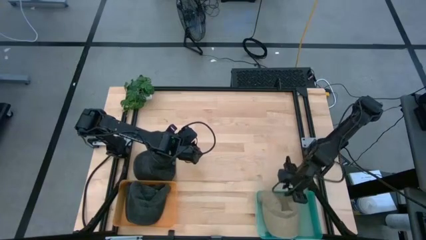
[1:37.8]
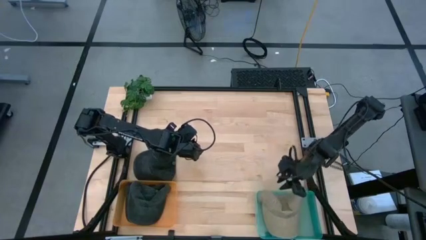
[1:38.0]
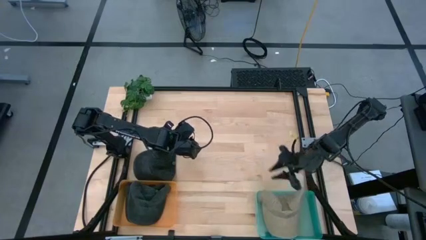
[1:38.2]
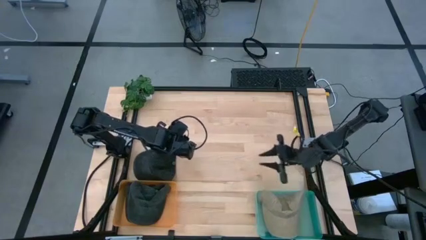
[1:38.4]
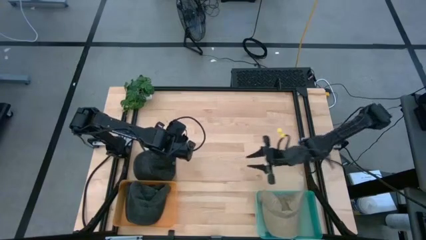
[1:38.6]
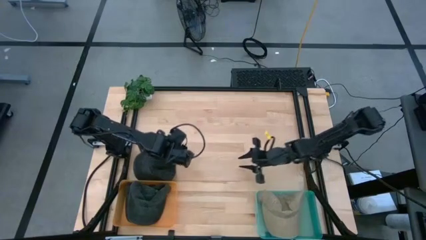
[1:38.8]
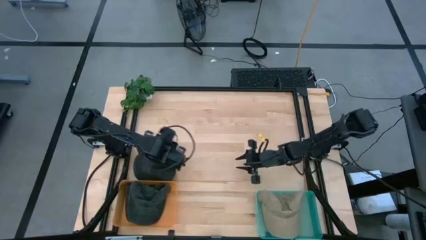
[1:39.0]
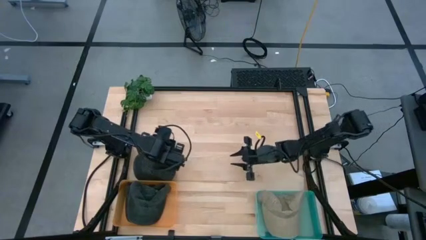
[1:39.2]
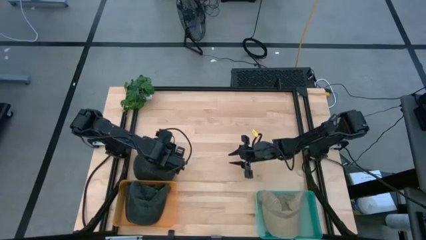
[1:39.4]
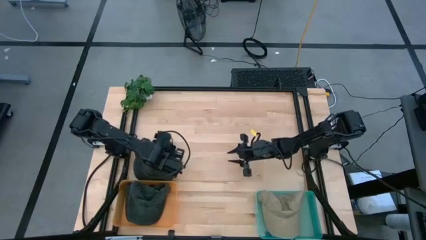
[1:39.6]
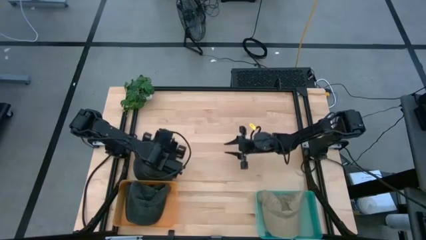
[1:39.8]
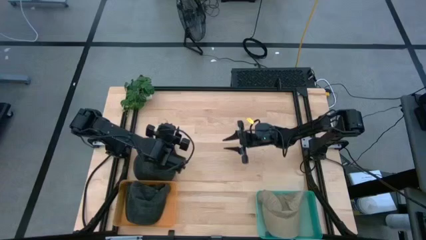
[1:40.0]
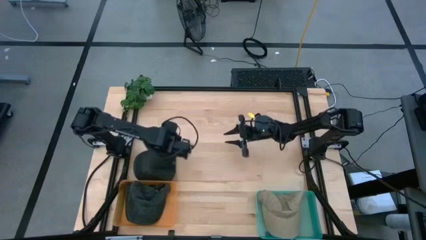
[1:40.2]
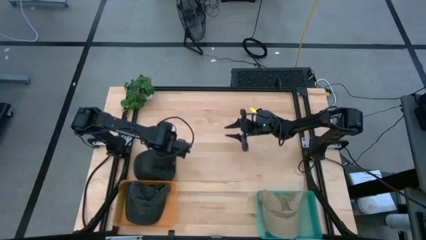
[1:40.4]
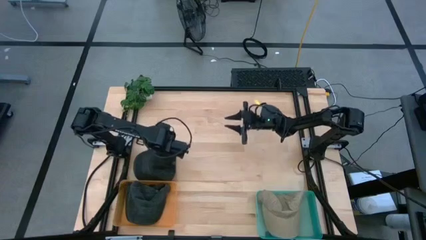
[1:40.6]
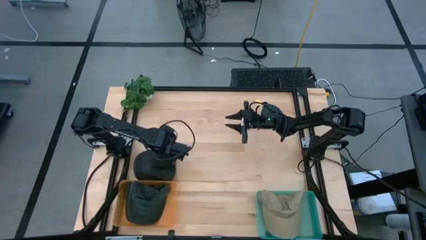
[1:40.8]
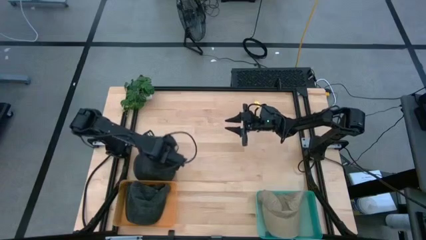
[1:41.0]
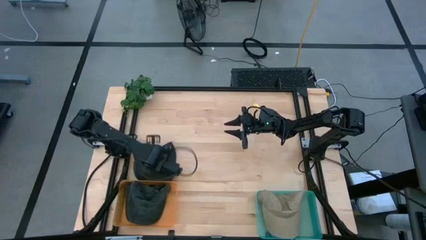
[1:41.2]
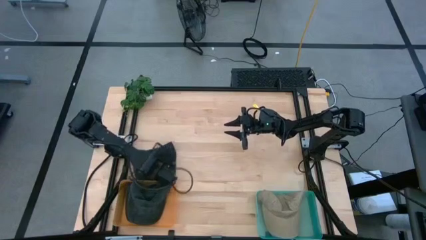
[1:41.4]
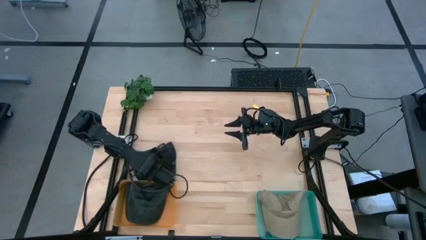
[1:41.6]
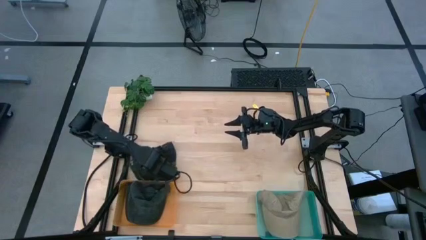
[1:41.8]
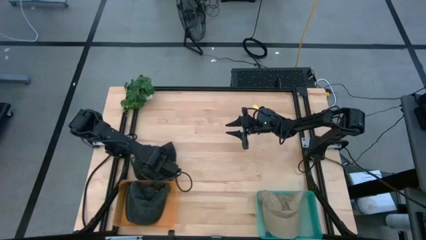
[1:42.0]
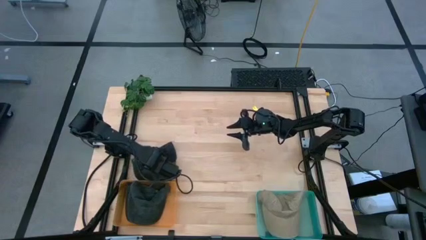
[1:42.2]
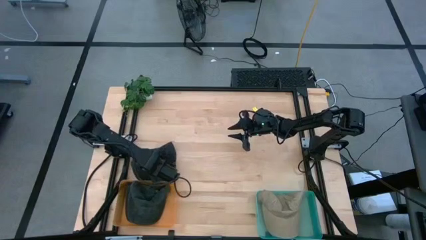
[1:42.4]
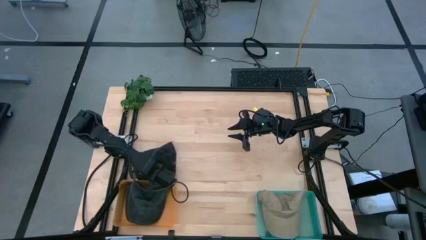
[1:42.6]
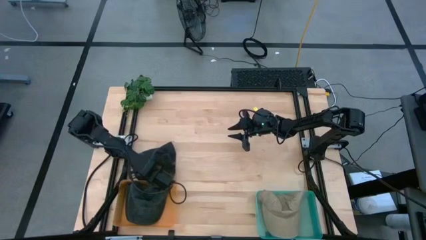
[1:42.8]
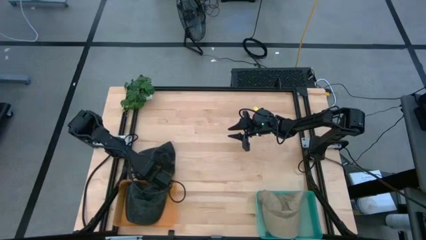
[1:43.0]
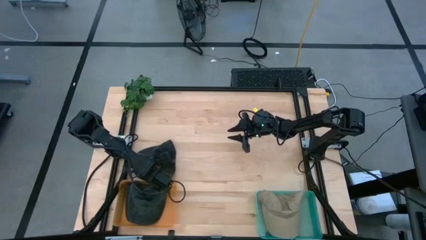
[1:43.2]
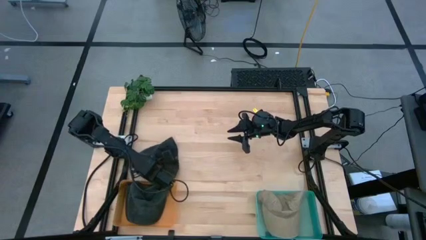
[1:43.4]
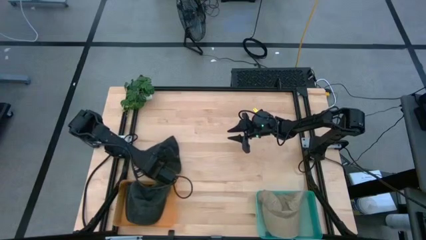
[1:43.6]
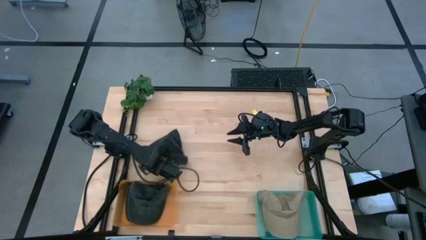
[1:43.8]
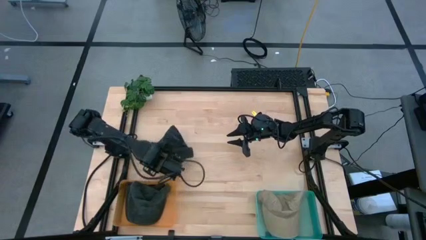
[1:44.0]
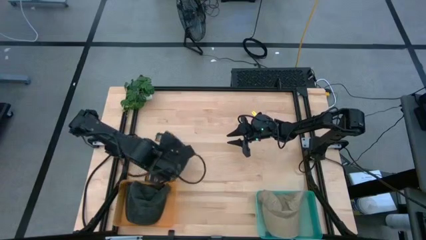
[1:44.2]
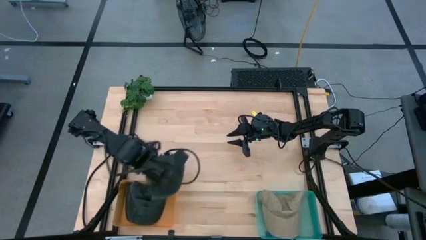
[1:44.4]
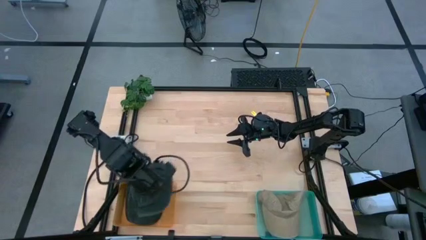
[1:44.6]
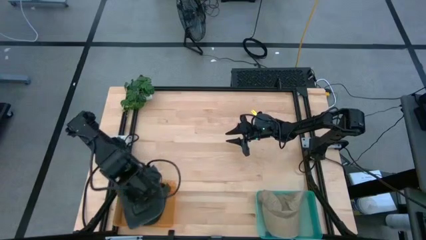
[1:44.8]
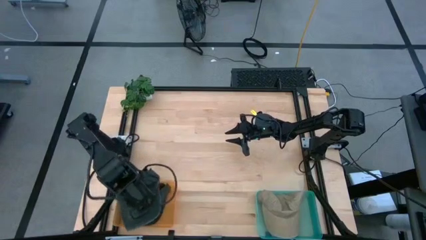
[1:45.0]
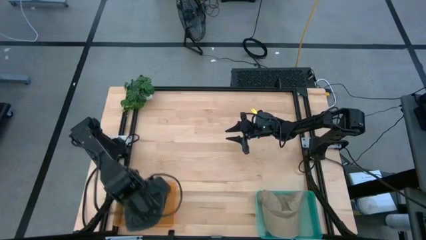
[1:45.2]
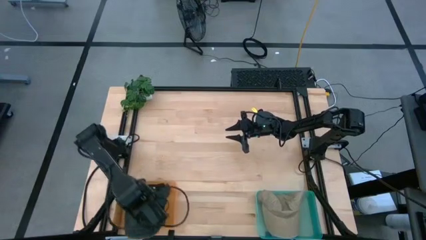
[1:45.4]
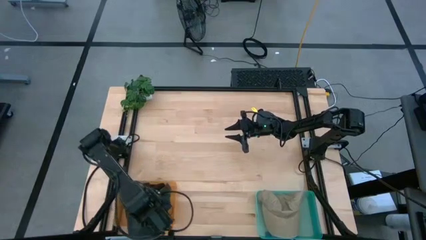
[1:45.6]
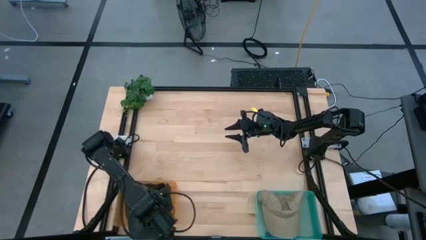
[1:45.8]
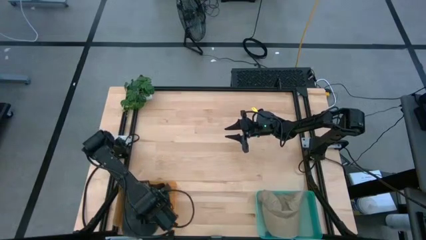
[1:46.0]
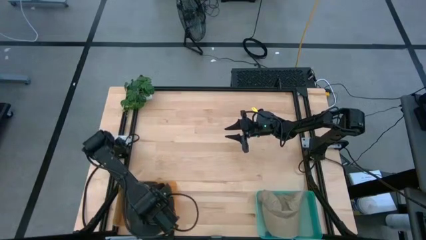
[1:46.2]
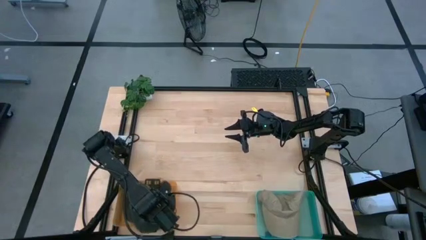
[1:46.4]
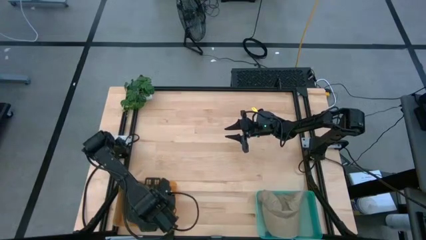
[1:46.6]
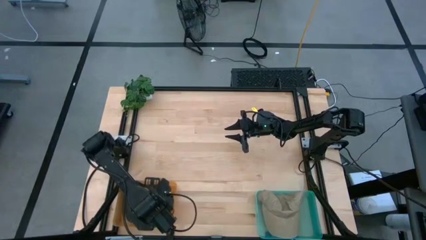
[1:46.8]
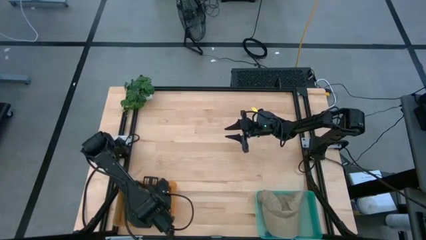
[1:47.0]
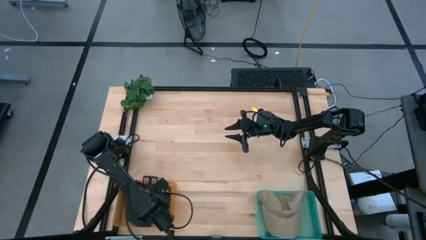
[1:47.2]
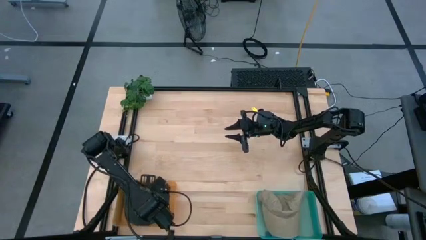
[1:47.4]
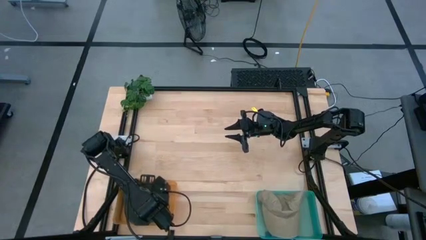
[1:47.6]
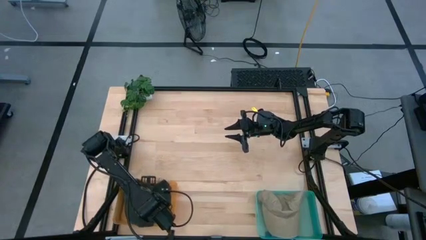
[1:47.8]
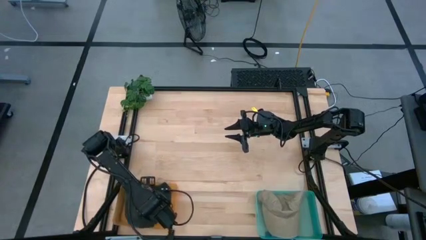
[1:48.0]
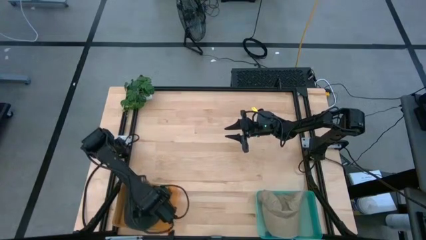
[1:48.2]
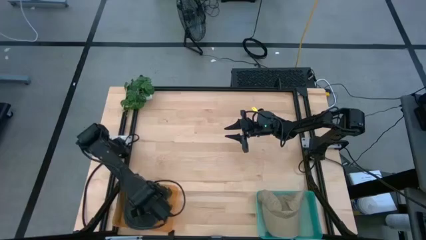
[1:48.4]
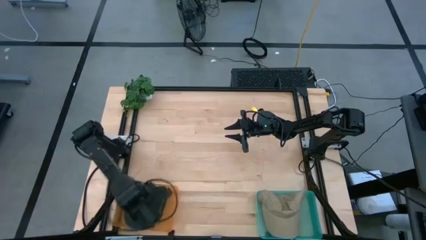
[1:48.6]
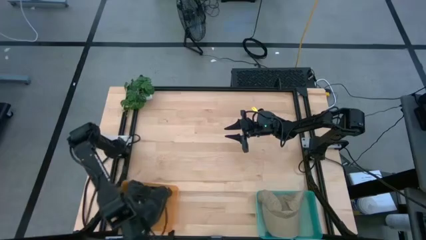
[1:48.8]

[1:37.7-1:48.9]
Task: Pick & Place hat
Put the black cap into the orange bin

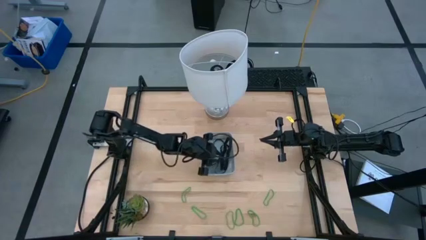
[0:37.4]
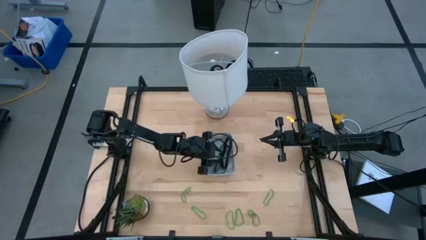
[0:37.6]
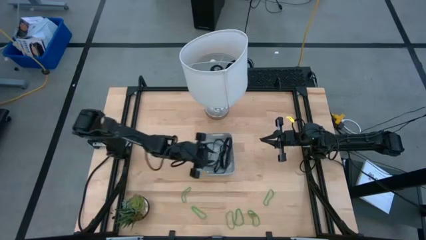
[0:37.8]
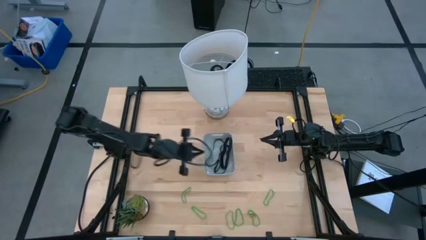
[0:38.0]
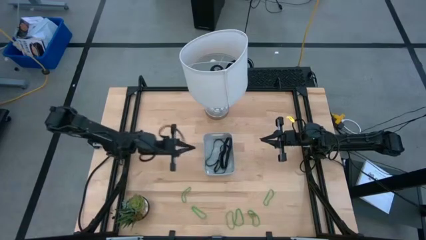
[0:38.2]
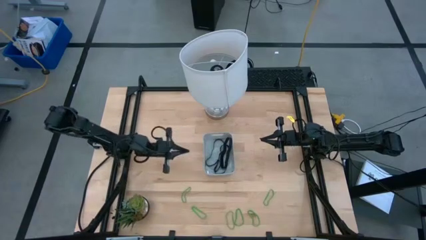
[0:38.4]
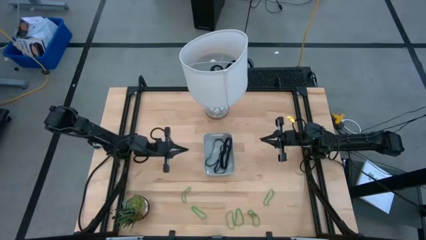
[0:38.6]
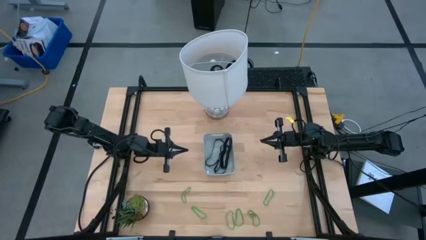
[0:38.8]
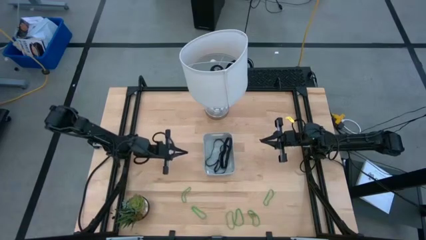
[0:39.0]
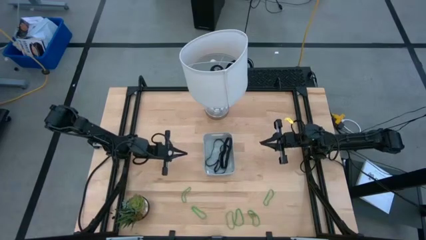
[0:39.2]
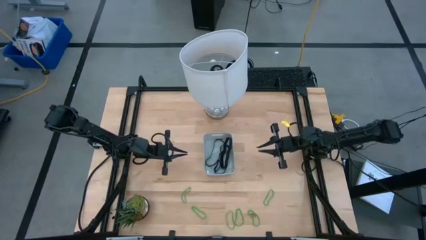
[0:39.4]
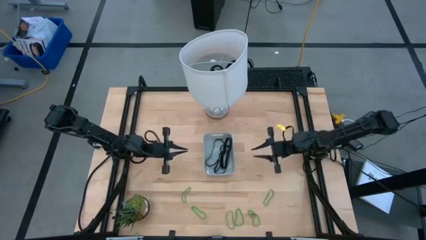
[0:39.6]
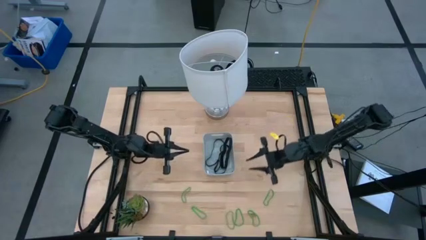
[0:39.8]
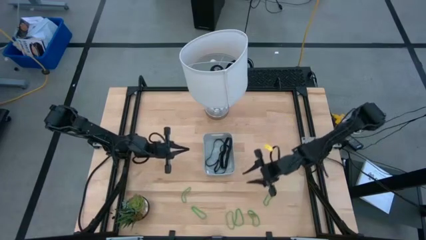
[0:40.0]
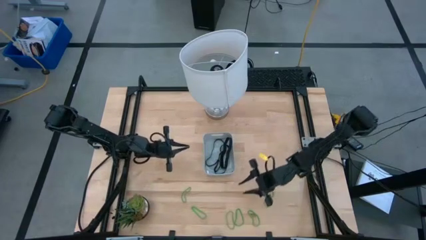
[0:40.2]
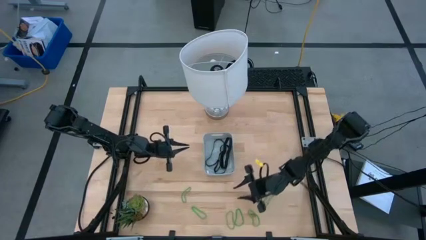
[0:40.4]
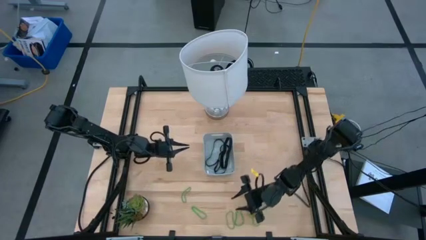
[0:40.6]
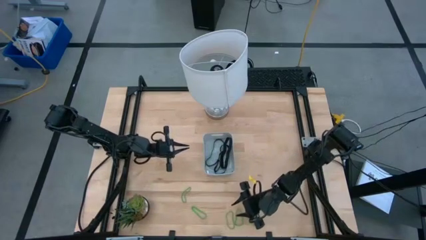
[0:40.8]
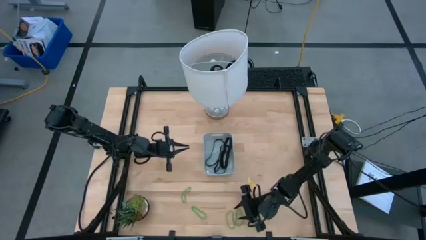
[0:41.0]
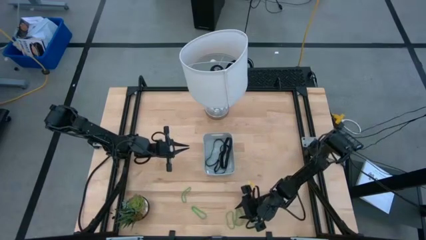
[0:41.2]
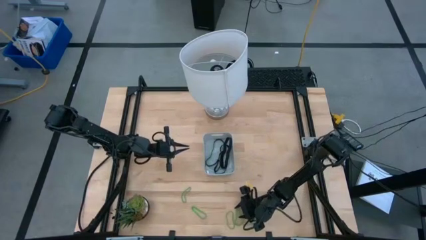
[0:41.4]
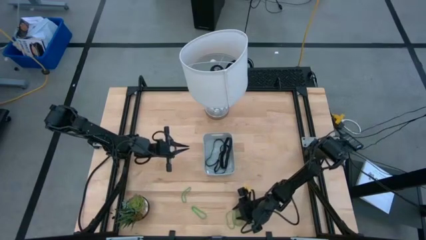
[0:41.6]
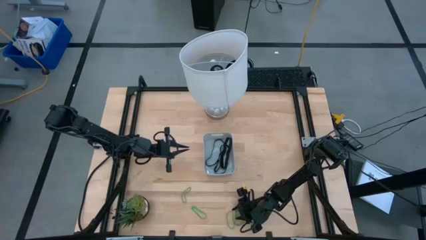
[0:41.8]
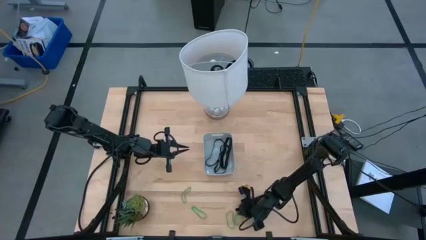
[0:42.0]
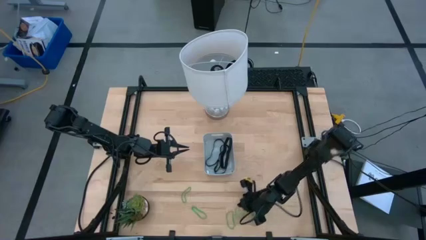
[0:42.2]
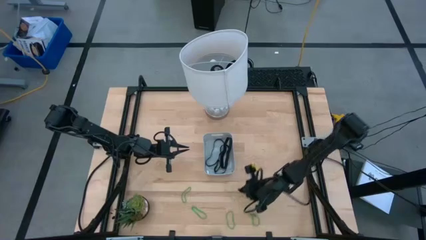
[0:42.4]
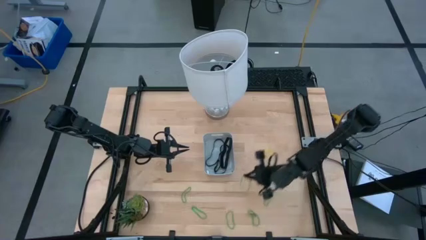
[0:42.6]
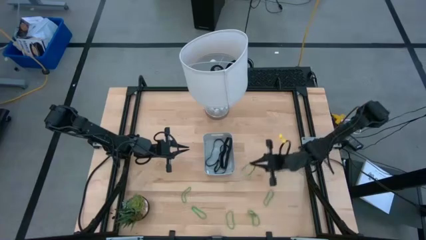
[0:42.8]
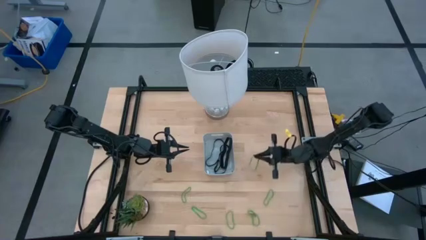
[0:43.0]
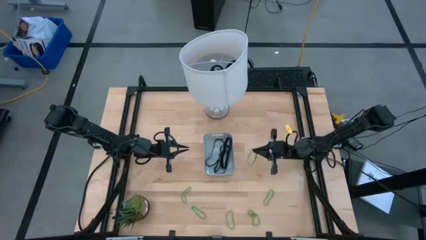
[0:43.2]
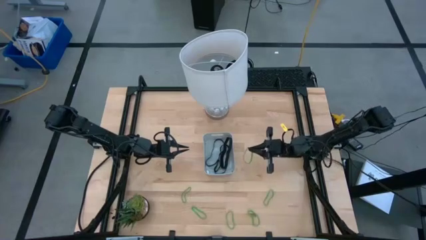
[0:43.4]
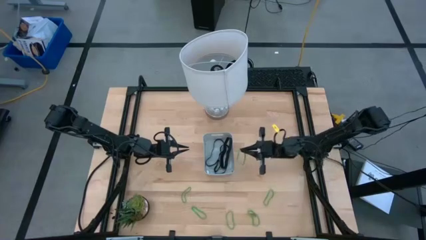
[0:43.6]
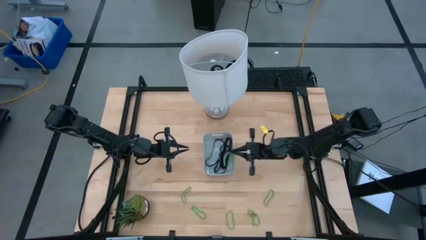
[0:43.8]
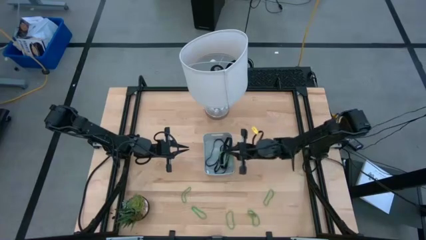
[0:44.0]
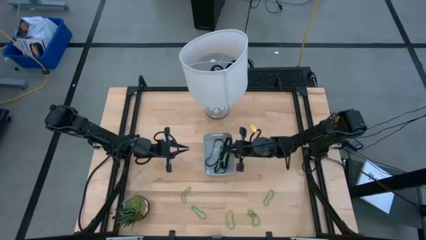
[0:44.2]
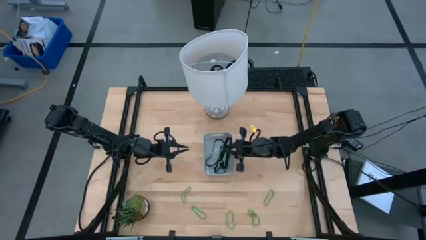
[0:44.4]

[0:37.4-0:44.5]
Task: Pick and place rubber bands into bin
Put the green rubber band into the gray bin
